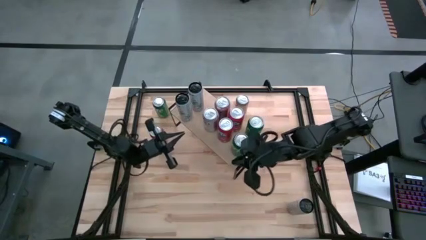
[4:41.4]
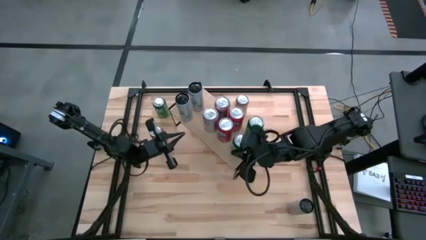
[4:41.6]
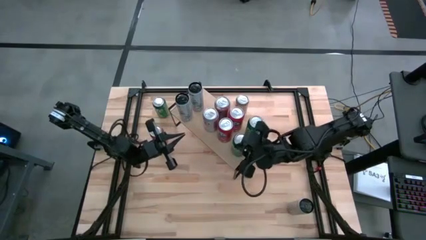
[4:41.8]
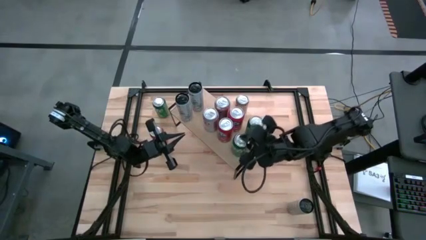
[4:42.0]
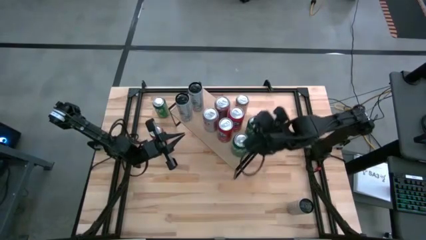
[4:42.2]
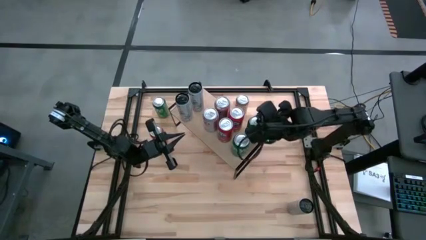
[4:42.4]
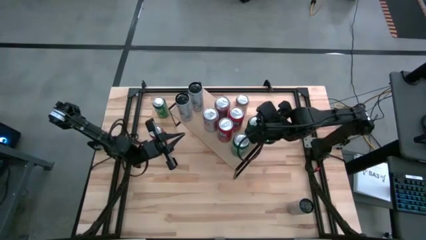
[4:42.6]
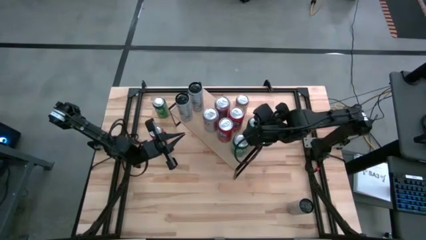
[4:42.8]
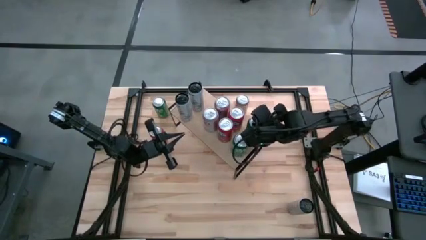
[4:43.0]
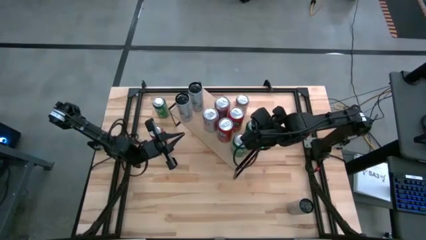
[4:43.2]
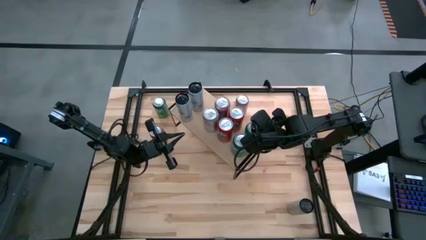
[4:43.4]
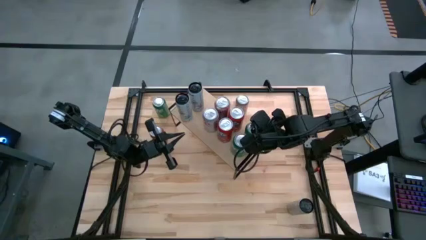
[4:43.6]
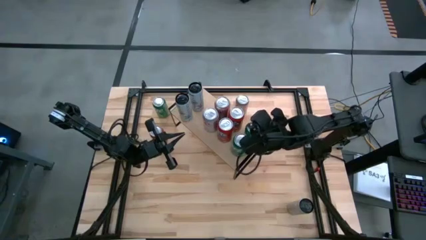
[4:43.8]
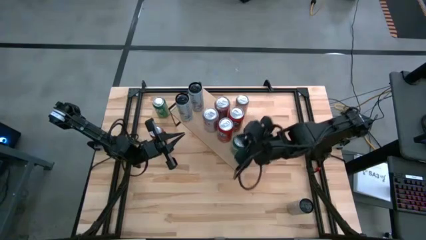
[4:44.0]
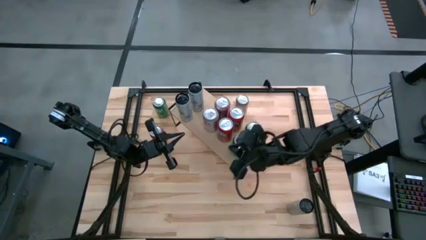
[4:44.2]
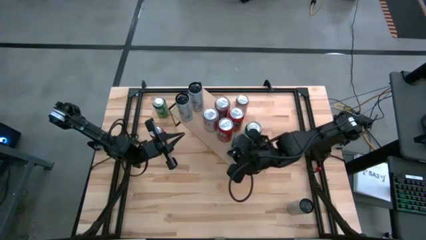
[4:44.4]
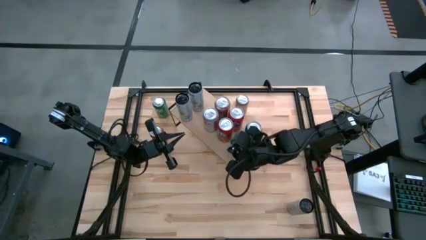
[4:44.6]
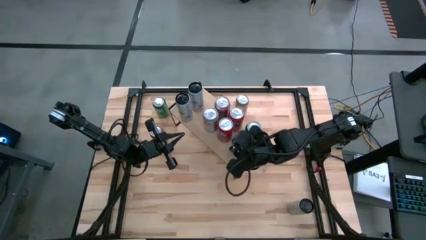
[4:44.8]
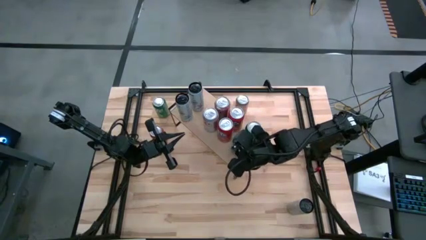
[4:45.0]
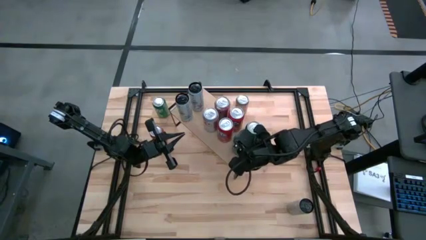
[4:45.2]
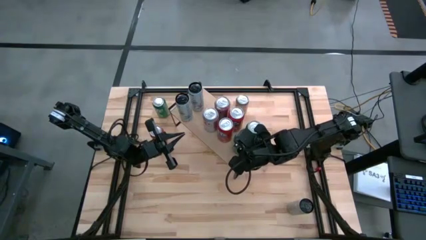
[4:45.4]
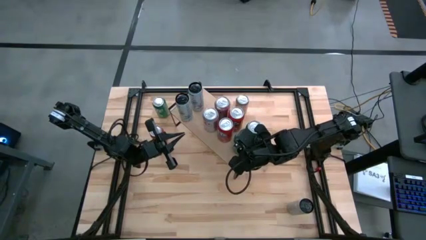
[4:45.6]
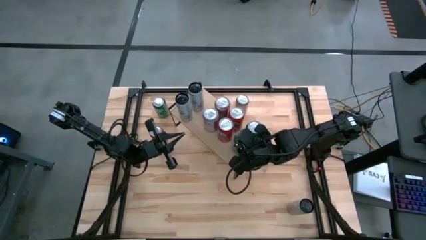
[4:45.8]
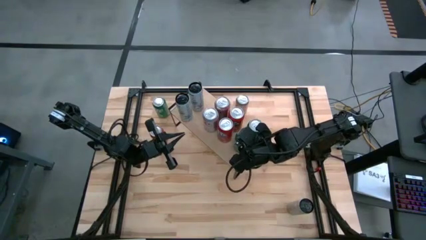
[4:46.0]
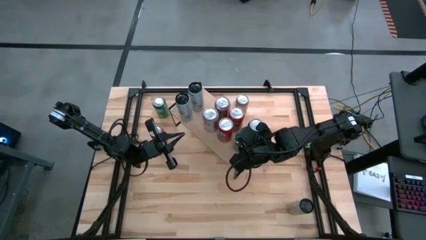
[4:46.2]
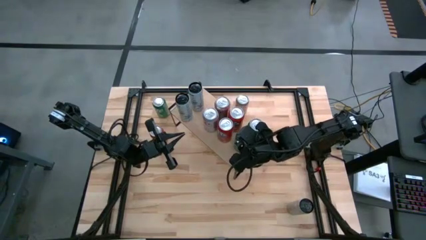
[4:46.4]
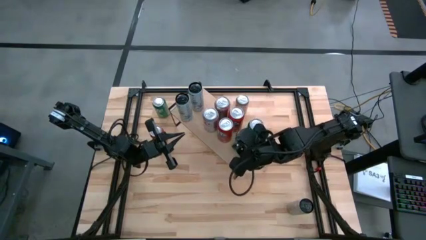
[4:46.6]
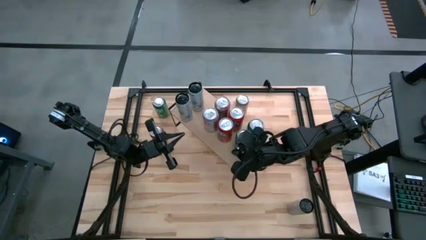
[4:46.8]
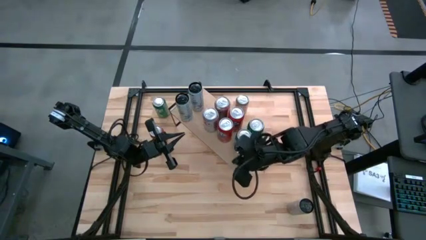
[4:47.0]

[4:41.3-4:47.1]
Task: Place canned beverage on shelf
Adjust the green soda cans

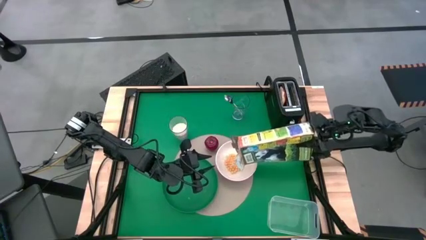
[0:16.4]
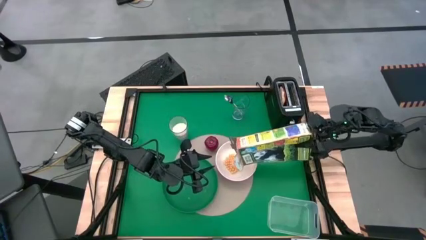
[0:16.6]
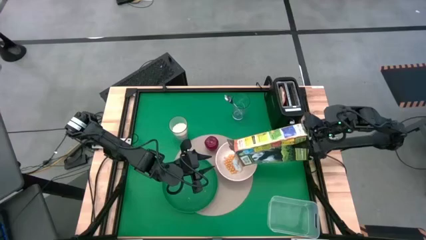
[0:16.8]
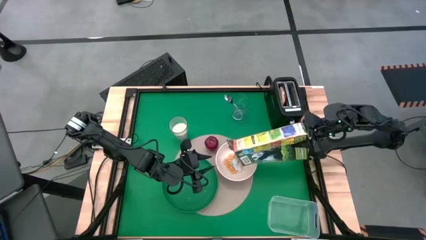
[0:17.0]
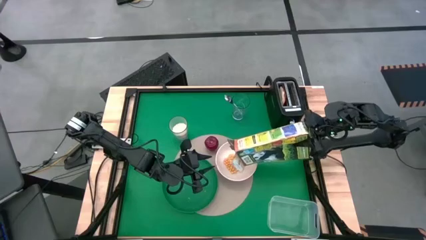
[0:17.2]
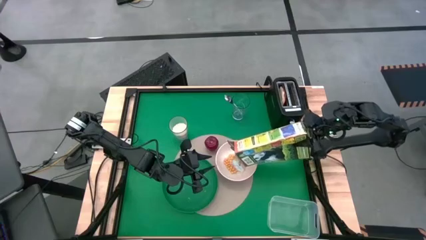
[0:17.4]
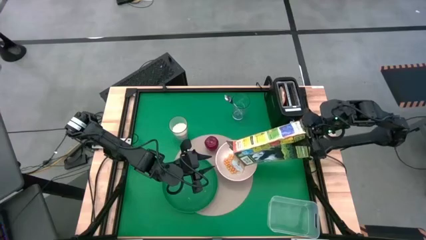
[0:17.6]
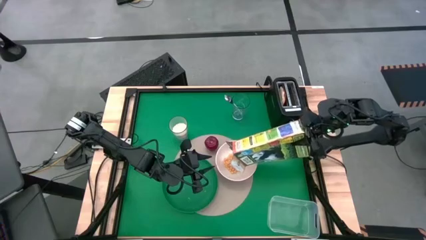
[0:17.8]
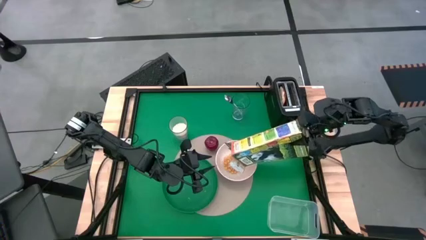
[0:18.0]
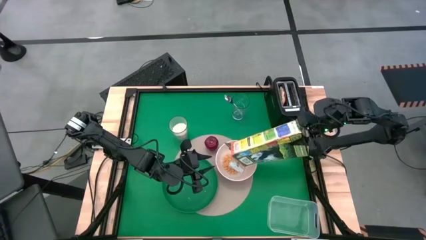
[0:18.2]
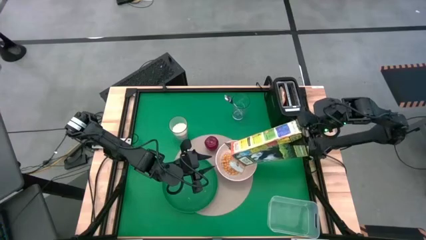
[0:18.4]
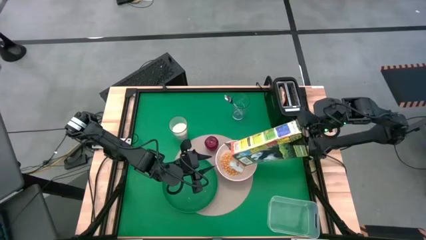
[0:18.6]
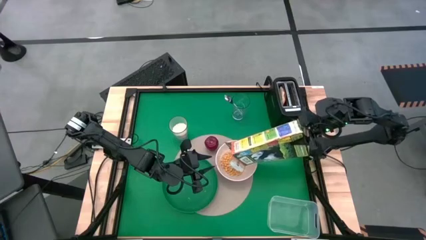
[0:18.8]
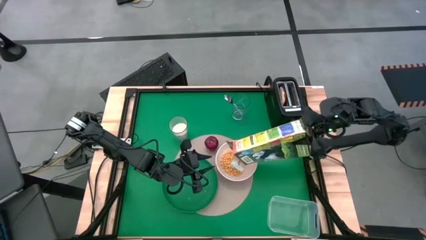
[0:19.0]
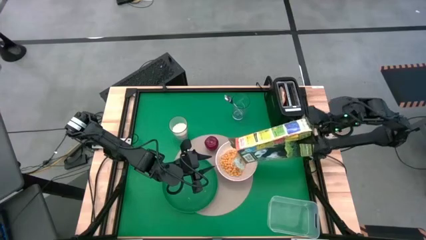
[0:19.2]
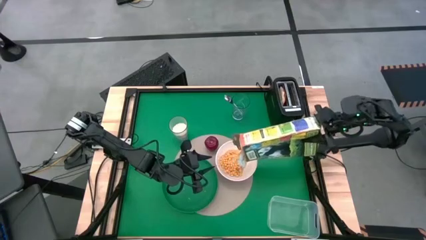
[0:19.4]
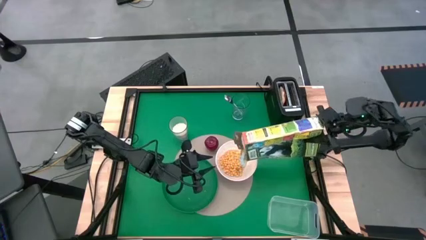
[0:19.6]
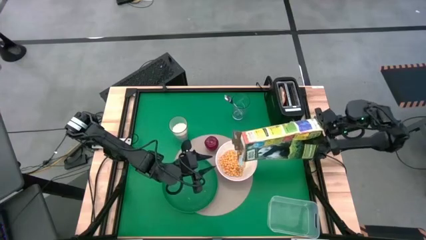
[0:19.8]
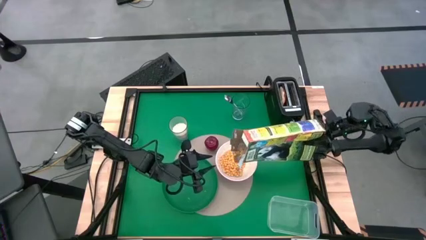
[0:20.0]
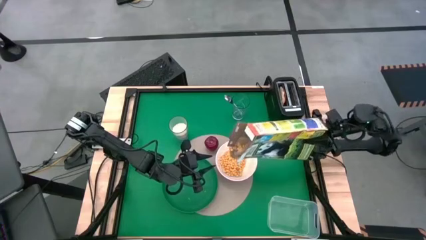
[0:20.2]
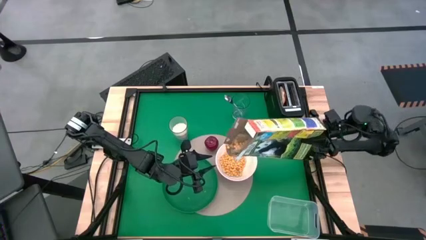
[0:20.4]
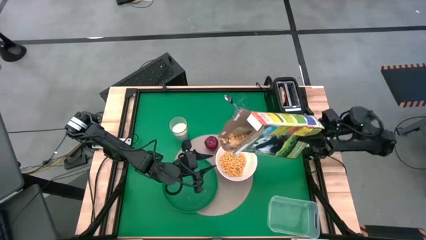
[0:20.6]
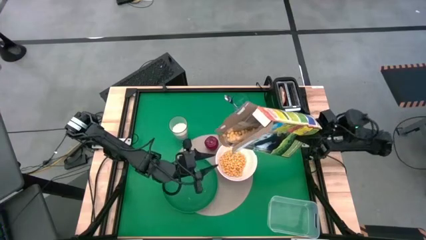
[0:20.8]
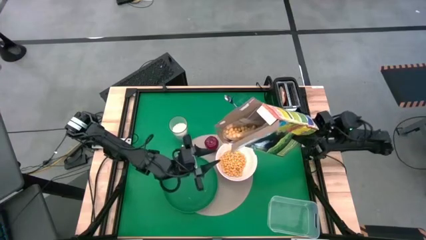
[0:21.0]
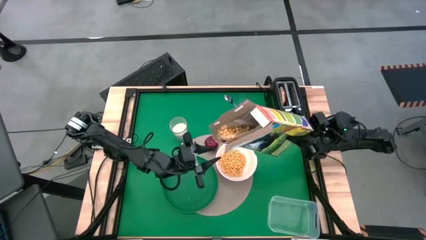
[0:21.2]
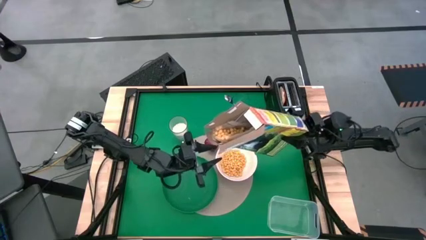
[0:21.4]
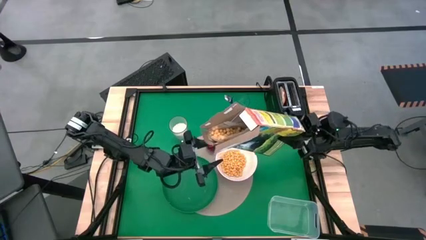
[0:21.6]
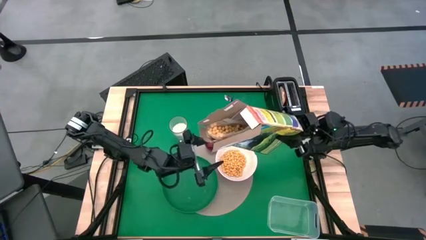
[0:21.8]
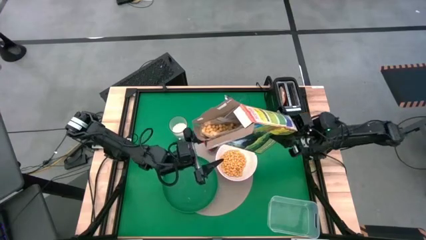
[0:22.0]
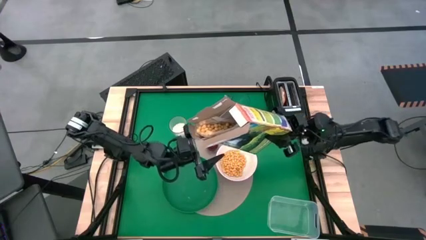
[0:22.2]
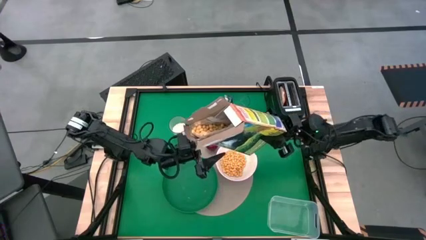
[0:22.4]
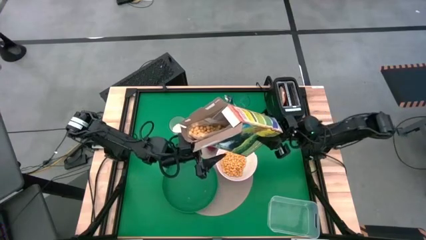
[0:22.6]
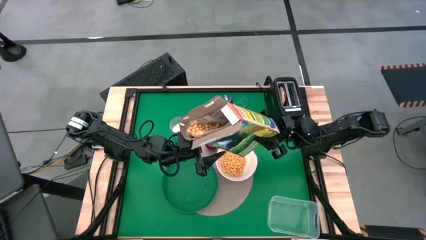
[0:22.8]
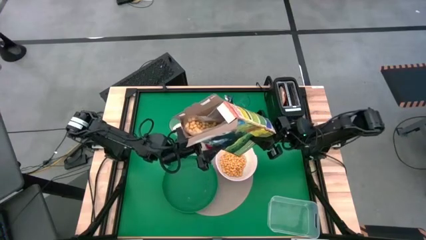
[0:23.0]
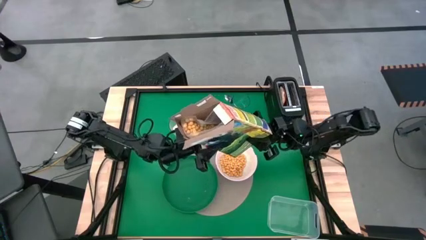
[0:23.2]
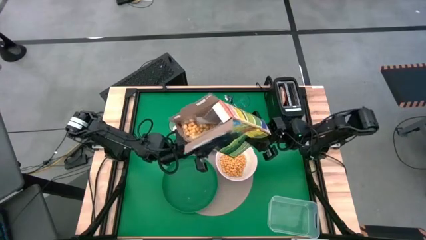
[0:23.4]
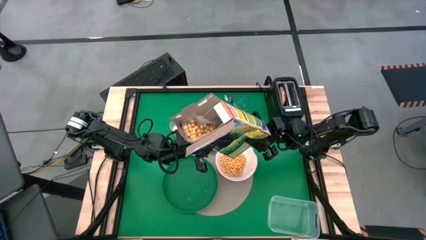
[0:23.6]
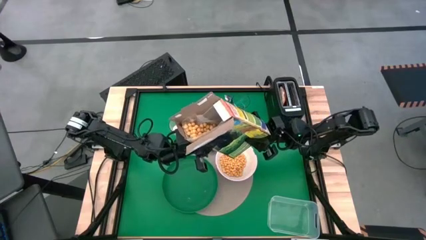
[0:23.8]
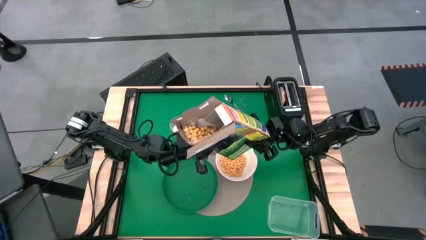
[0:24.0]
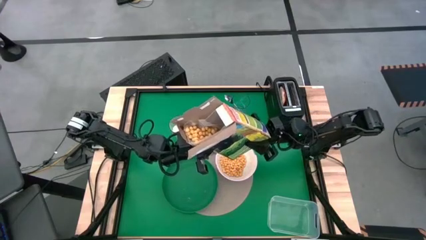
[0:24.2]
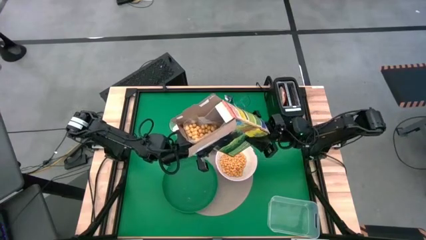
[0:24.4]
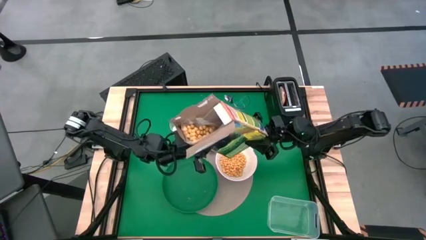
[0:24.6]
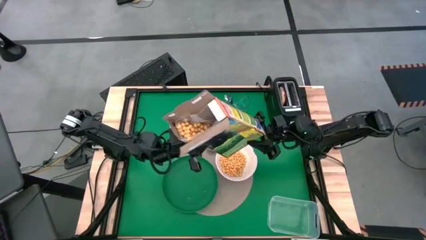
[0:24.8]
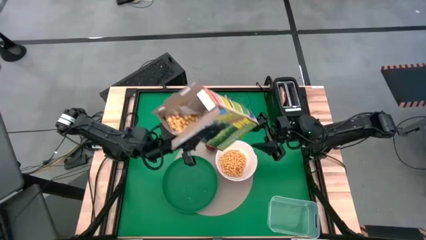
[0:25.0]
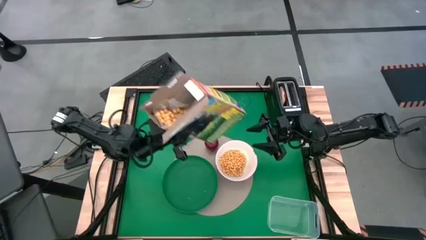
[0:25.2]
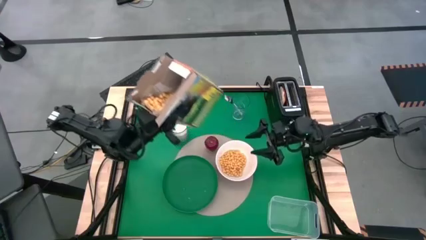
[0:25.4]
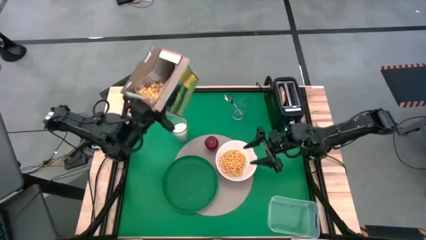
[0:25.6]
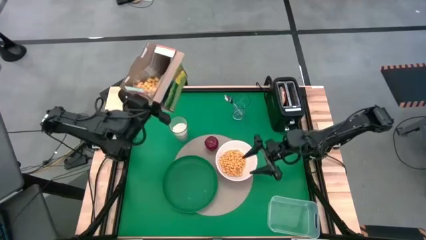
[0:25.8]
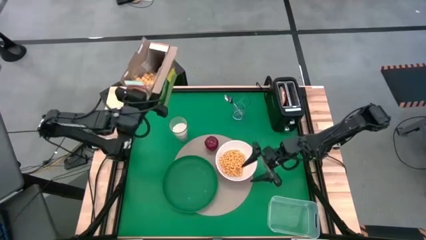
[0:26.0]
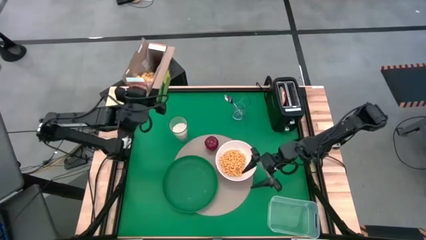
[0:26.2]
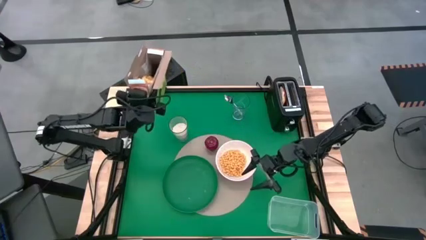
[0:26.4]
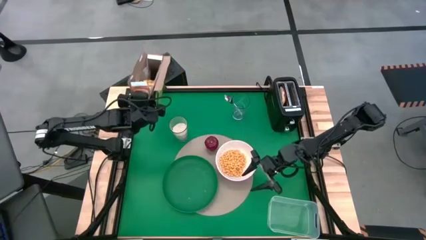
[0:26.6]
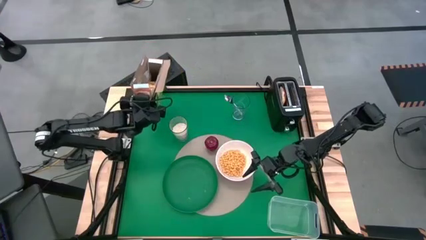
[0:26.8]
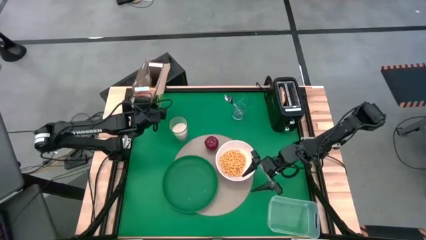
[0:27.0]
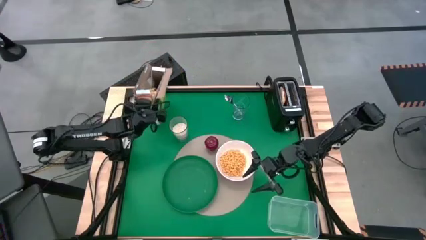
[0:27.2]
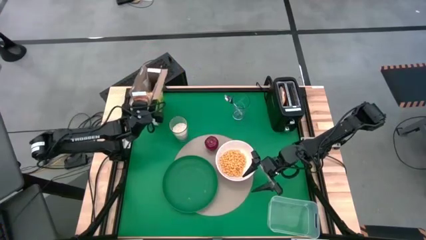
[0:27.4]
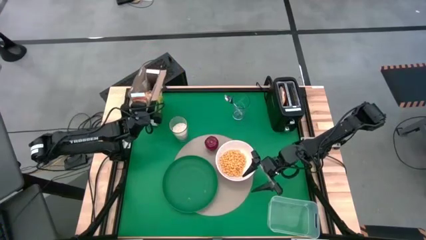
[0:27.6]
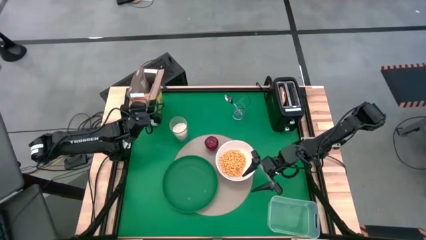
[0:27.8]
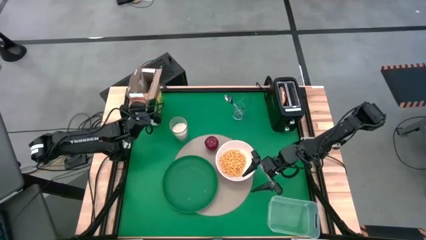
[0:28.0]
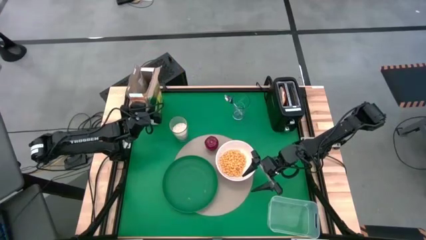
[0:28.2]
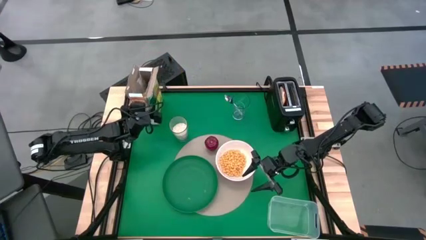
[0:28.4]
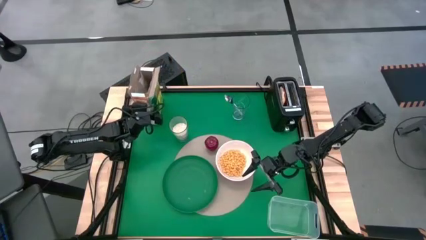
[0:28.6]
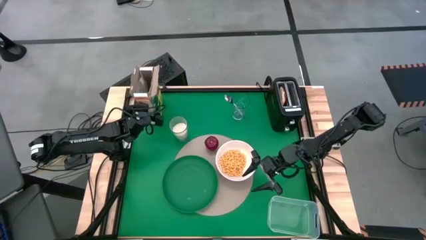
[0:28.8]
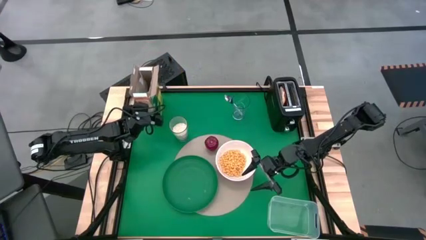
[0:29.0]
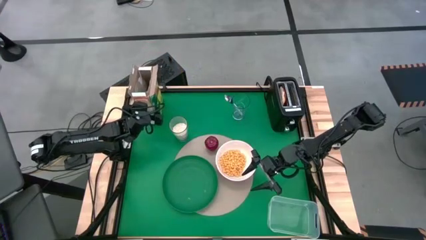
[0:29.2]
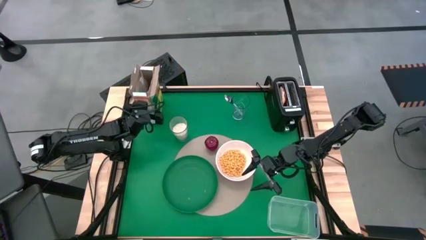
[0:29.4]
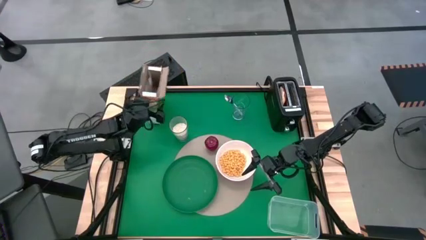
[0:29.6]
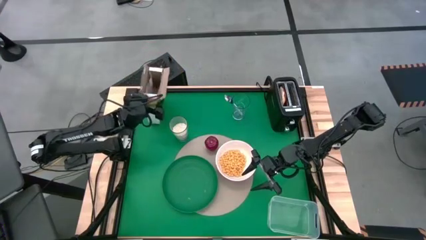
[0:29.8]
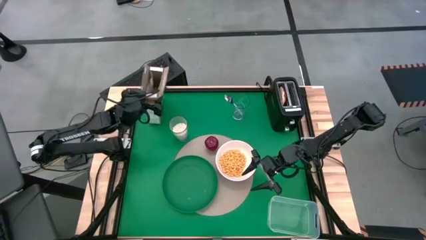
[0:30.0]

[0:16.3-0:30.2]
Task: Arrange a breakfast setting
Pour the cereal into the white bowl
